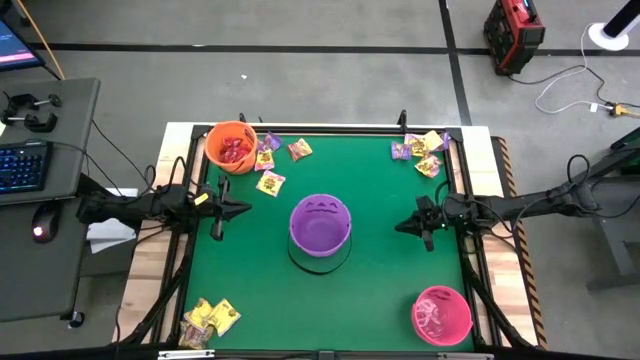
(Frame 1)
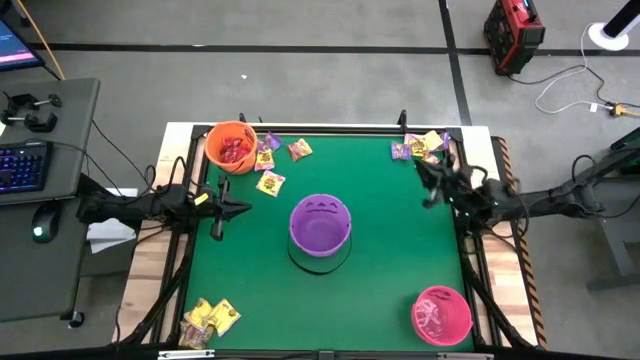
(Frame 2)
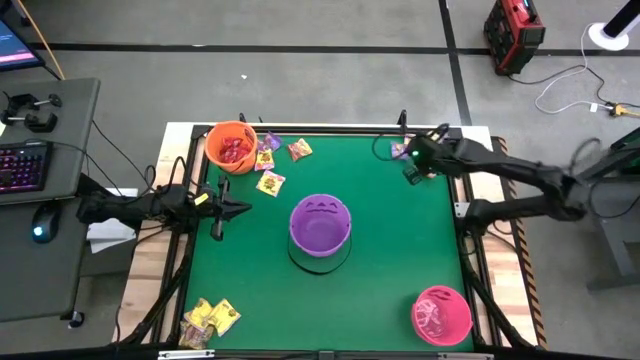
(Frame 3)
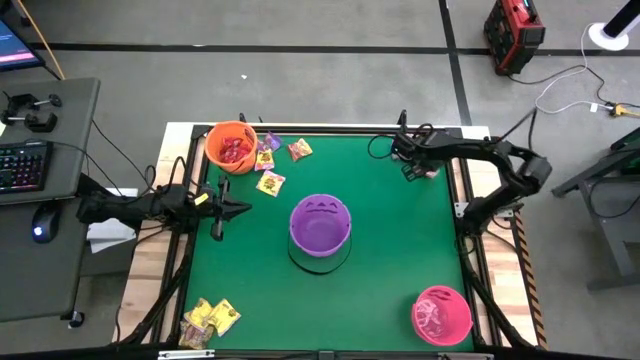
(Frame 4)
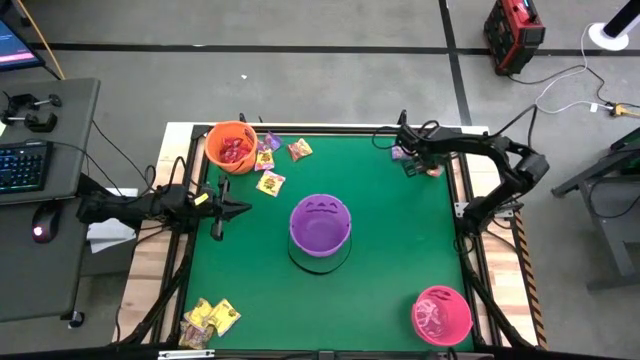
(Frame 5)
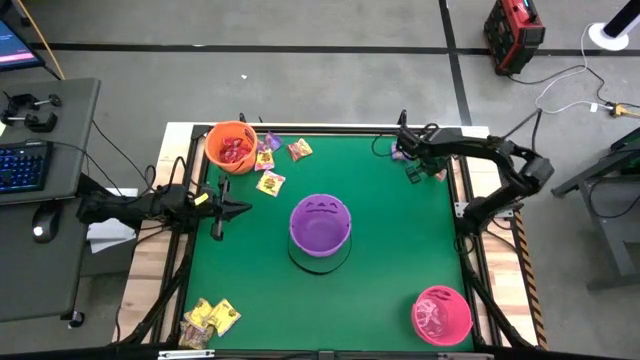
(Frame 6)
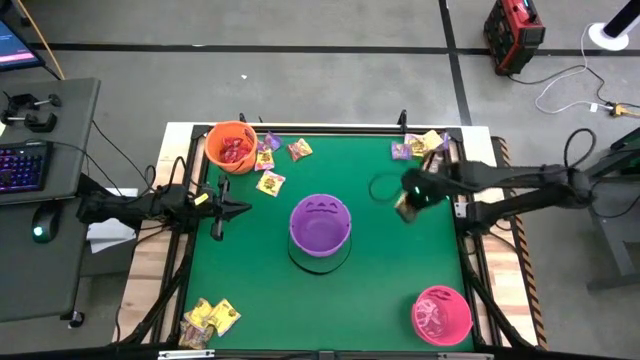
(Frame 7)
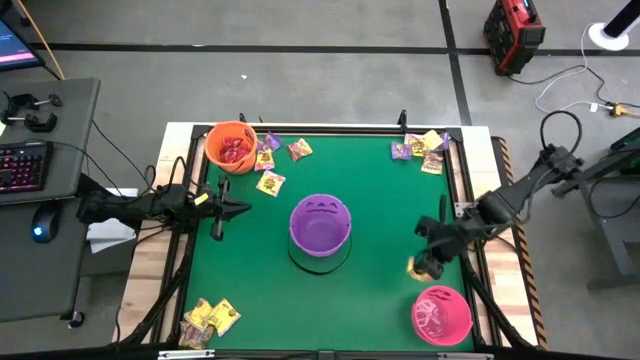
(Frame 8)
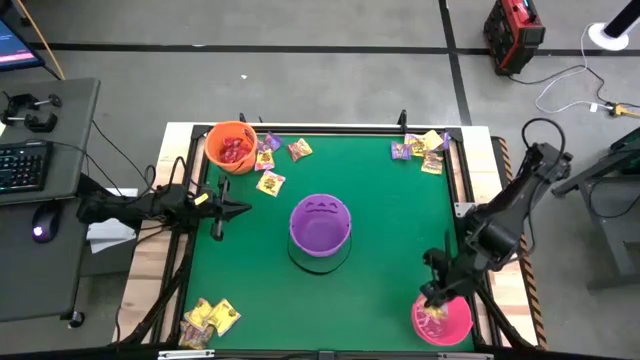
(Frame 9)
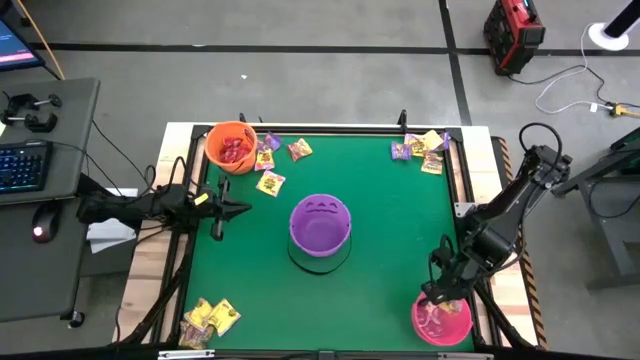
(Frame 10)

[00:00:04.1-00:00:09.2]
Task: Sort candy by brand, put in halloween buckets
Put the yellow candy into the pink bucket

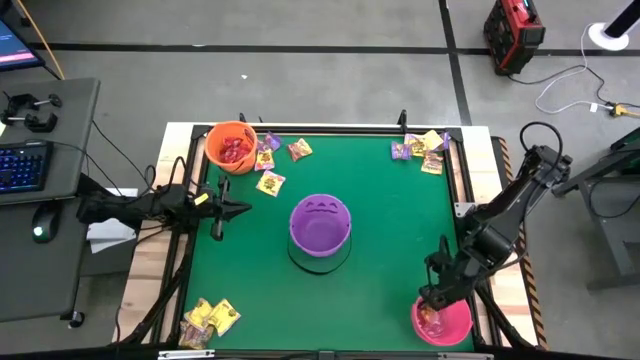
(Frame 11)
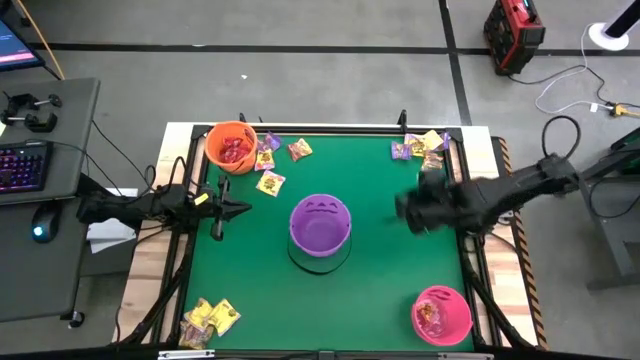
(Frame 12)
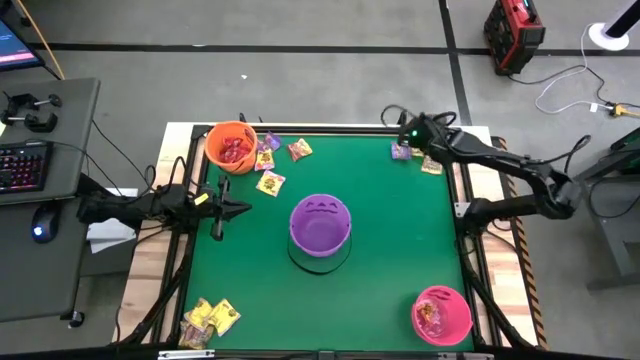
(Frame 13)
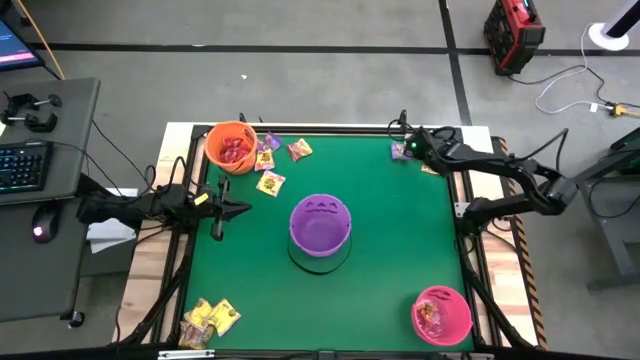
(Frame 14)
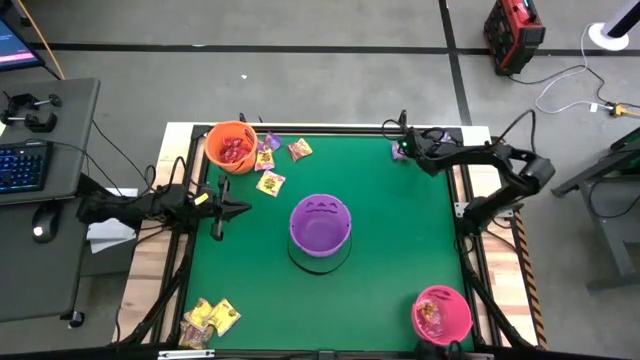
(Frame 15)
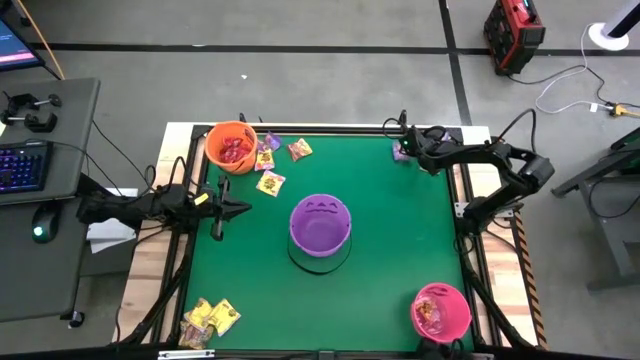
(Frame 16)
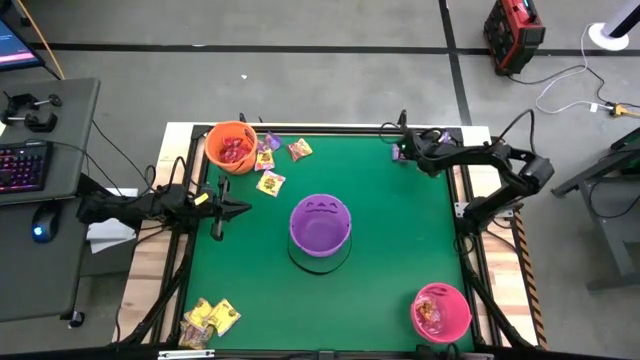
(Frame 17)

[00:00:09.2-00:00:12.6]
Put the yellow candy into the pink bucket

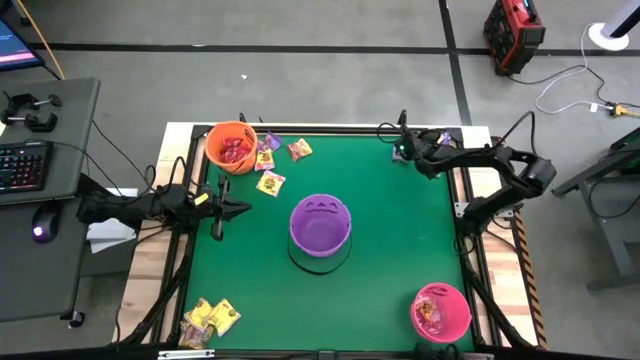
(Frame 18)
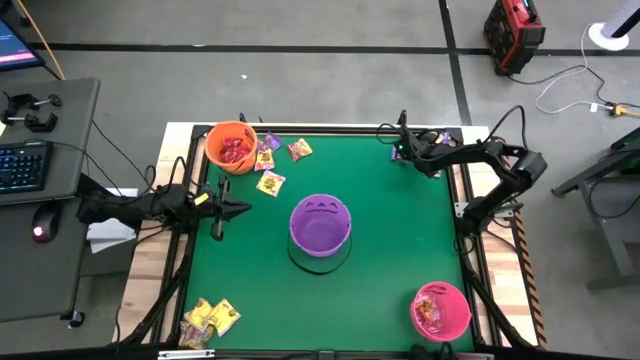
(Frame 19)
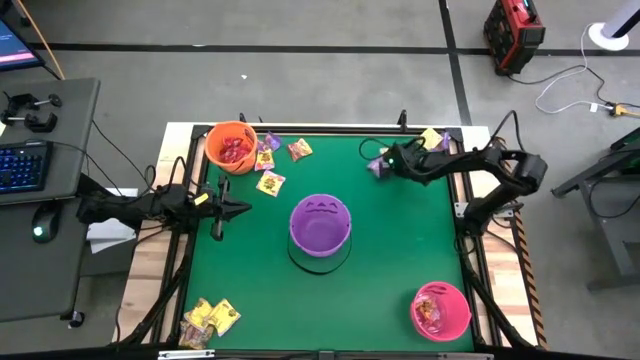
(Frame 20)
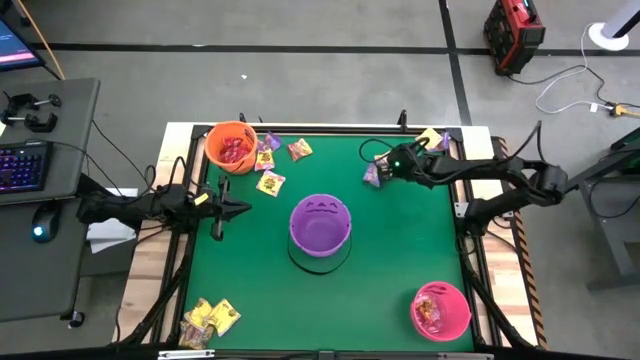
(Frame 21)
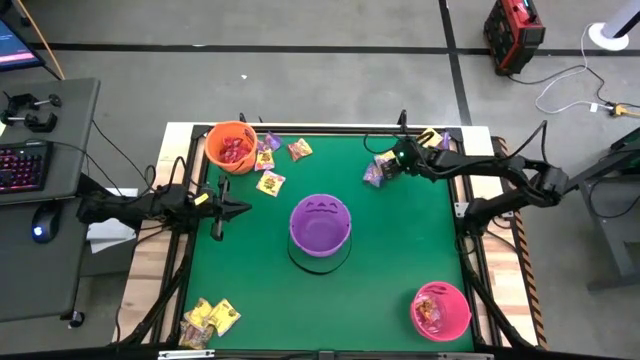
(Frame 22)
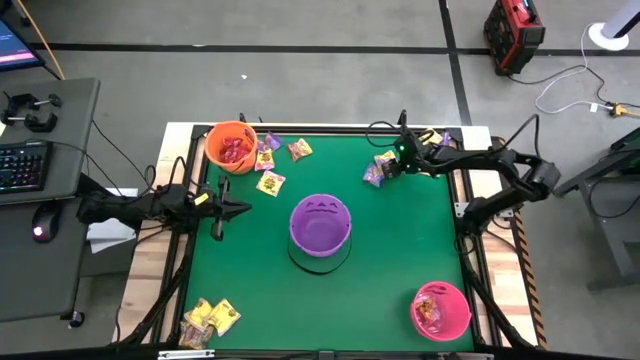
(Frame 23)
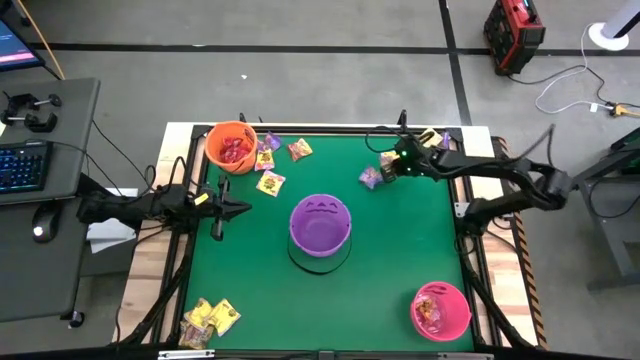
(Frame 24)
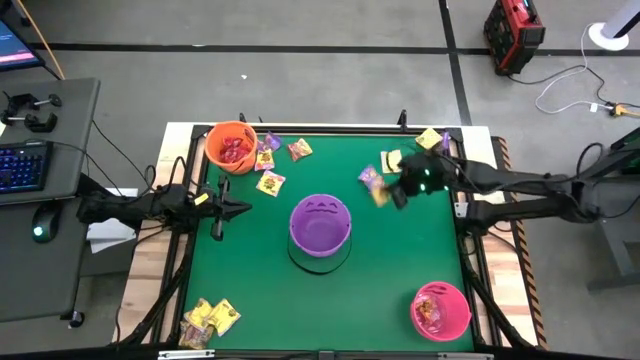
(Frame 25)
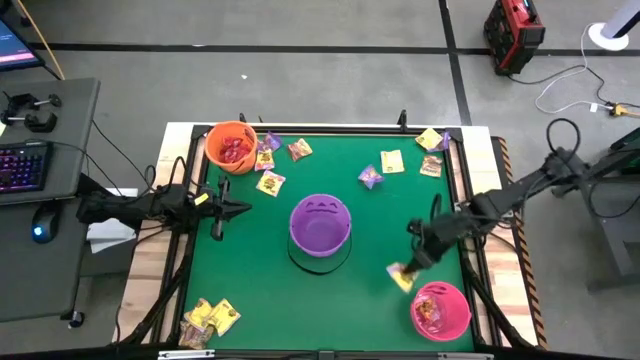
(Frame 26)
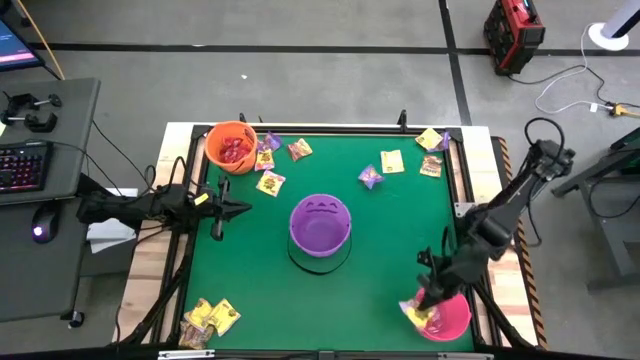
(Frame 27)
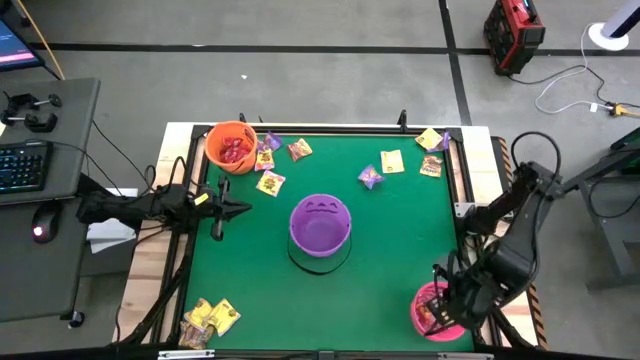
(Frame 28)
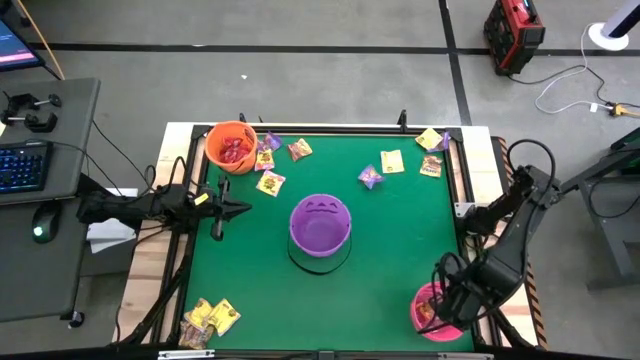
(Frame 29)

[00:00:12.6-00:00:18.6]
Put the yellow candy into the pink bucket

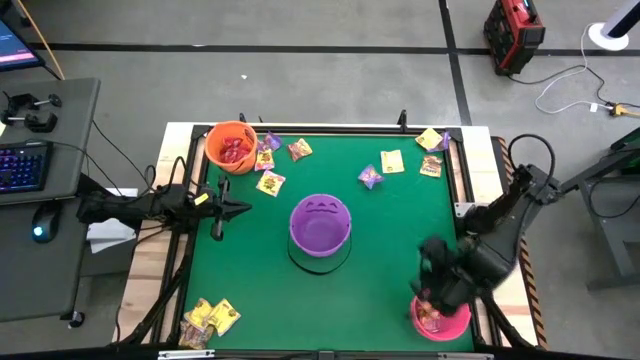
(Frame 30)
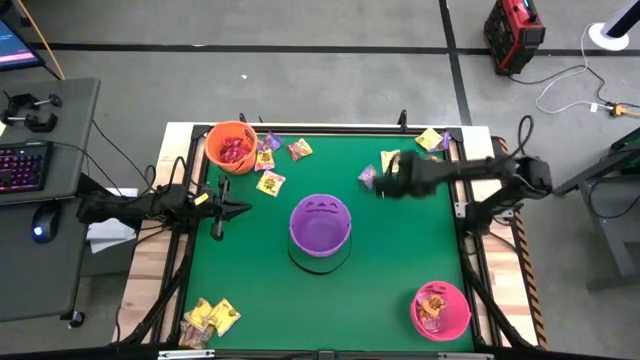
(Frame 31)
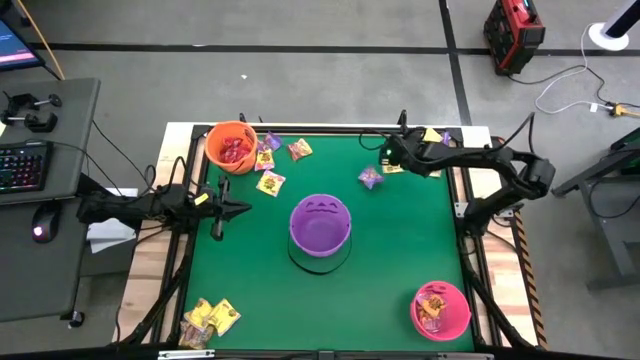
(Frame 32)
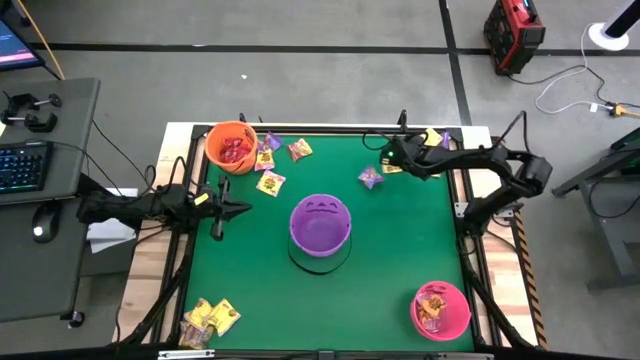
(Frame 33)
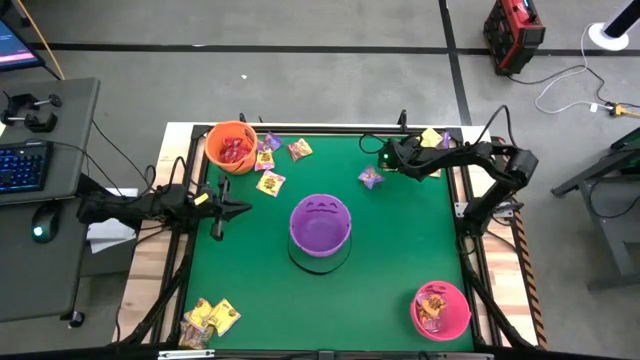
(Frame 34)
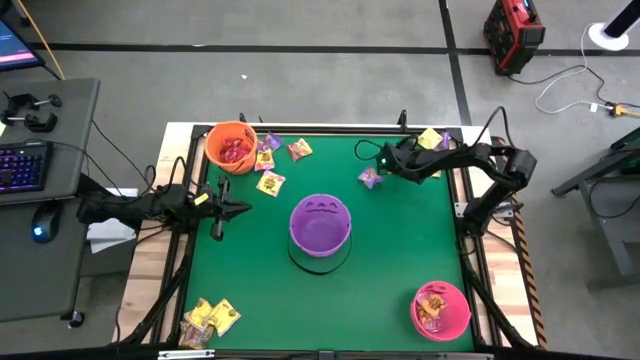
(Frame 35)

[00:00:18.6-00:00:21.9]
Put the yellow candy into the pink bucket

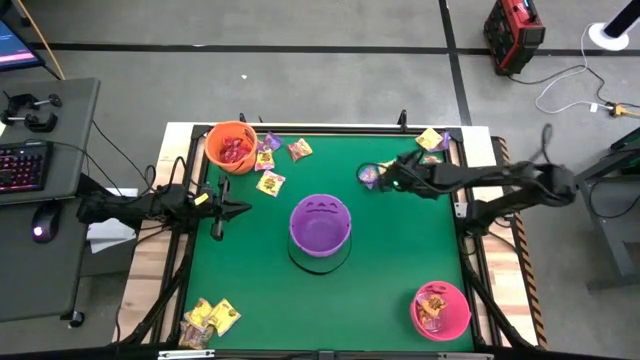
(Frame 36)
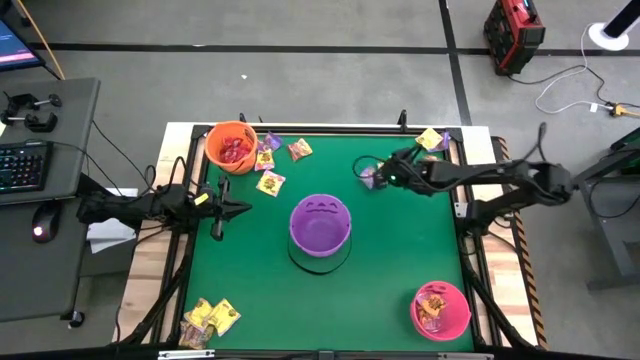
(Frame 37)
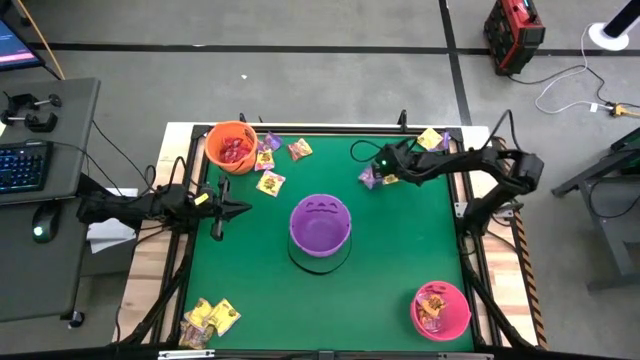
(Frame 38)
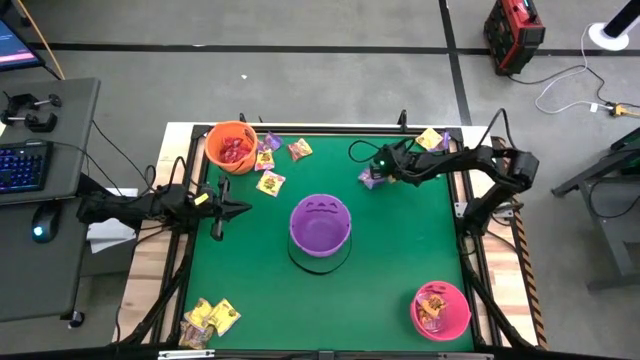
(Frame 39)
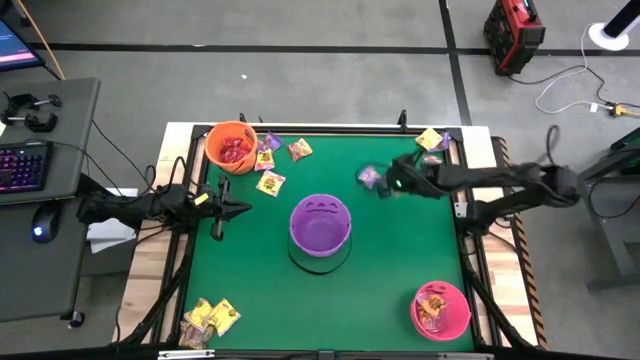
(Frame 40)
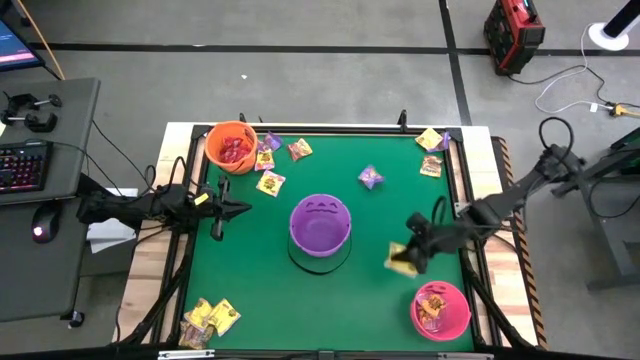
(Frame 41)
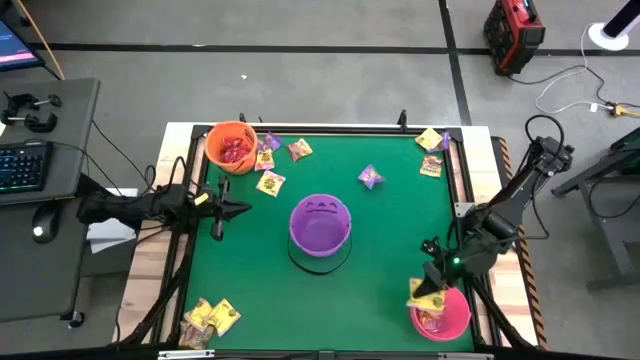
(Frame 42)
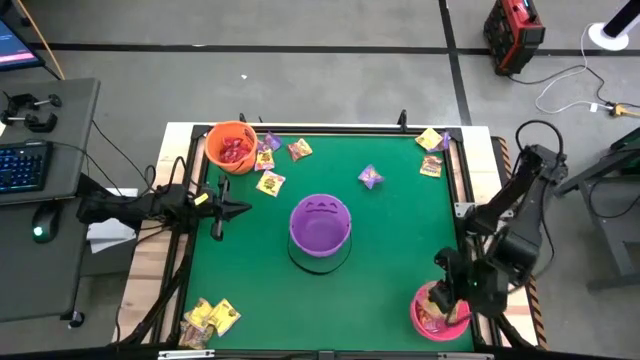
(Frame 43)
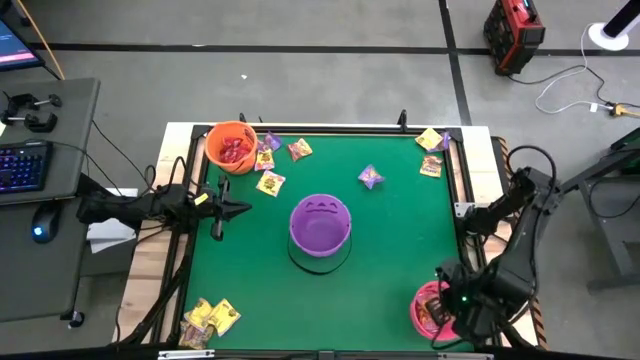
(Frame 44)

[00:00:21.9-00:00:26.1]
Put the yellow candy into the pink bucket
